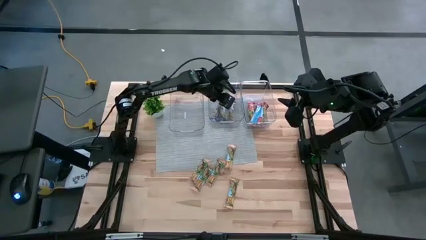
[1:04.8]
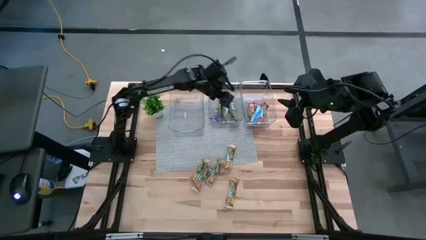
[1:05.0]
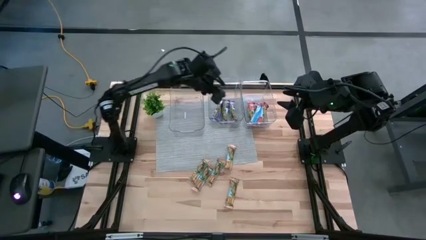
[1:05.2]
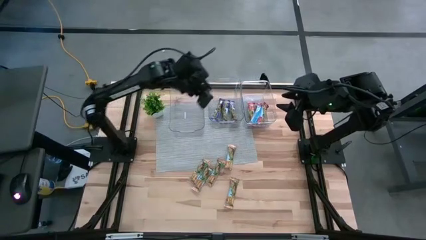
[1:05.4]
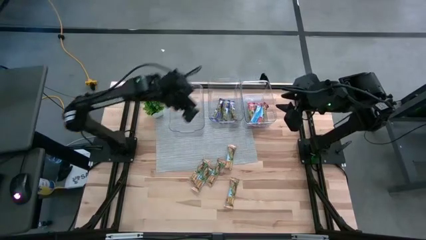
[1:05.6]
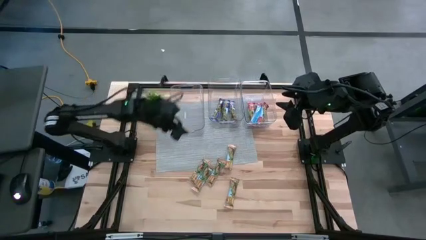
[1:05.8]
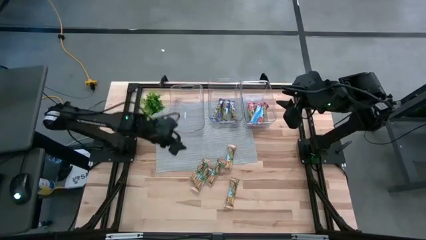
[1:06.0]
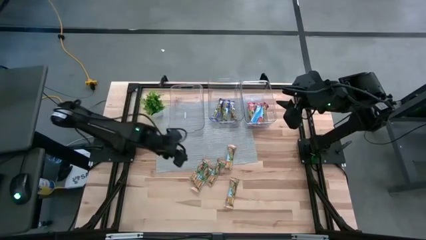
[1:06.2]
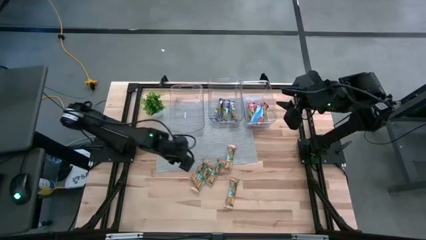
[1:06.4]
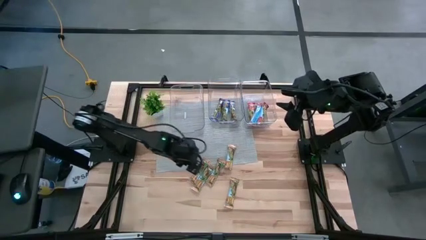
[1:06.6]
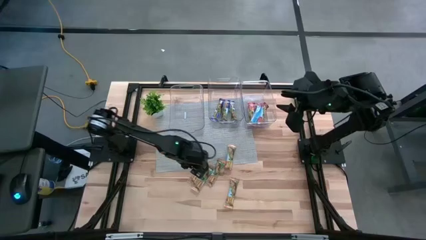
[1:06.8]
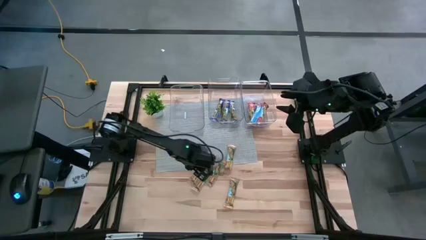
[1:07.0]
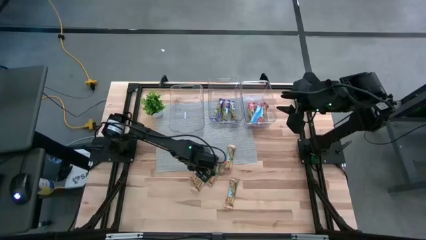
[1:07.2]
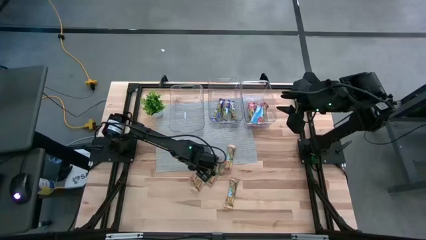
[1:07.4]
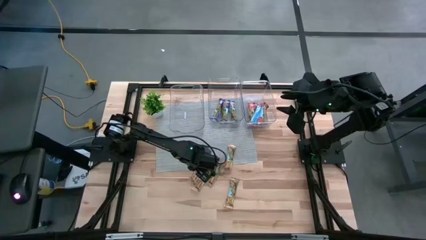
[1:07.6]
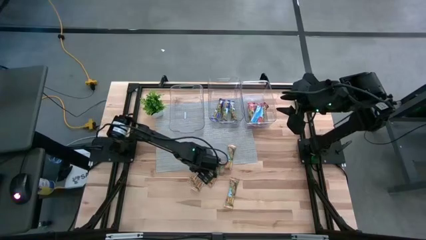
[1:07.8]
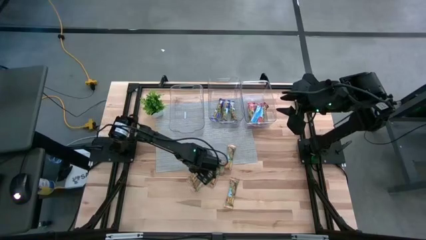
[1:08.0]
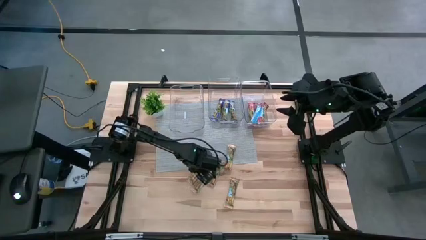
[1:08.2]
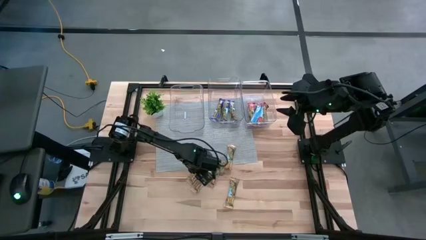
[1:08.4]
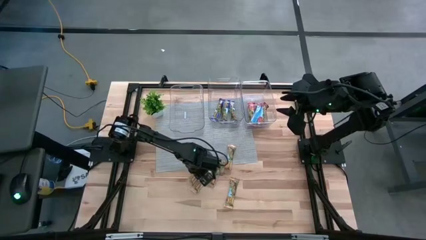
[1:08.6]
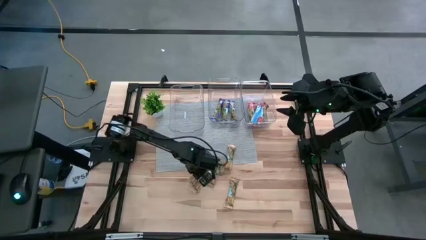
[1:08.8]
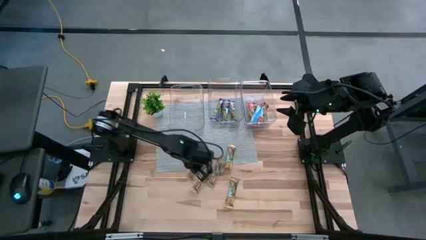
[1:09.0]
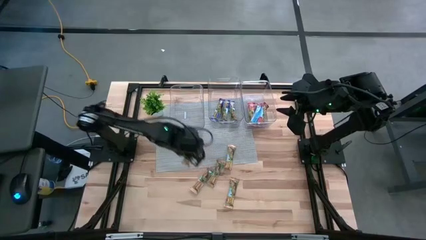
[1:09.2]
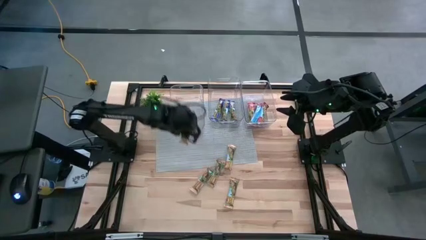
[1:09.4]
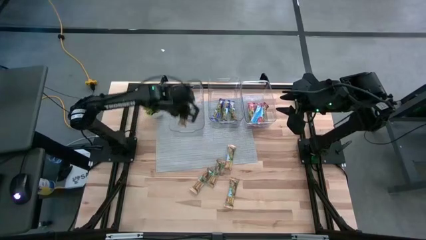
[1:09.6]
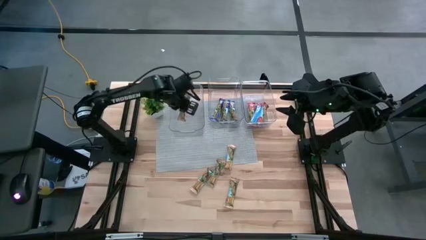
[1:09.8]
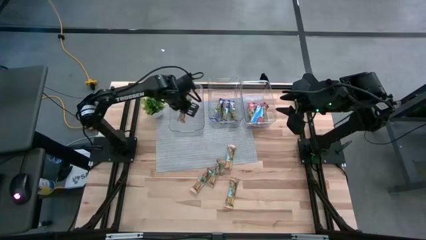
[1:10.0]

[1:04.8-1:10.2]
Task: Pick and place Granola Bars by type
Put the yellow granola bar into the left transparent bin

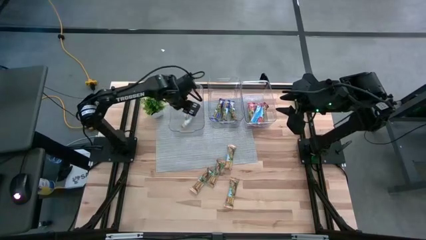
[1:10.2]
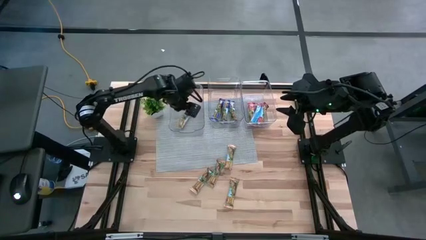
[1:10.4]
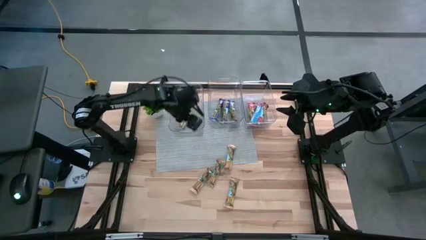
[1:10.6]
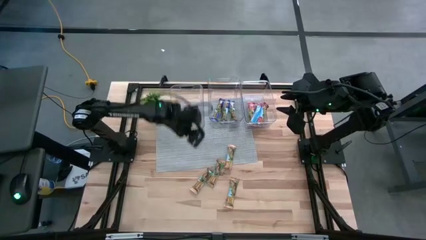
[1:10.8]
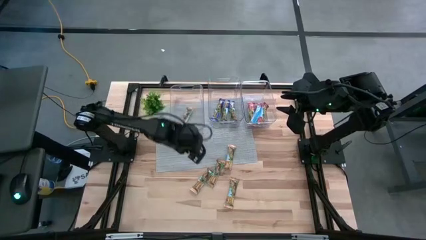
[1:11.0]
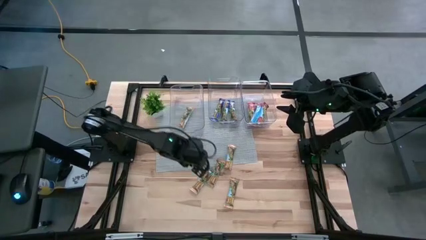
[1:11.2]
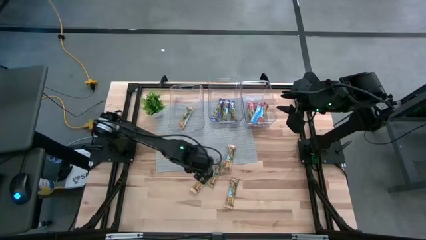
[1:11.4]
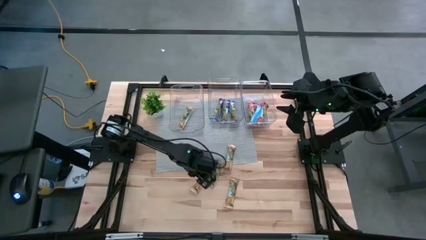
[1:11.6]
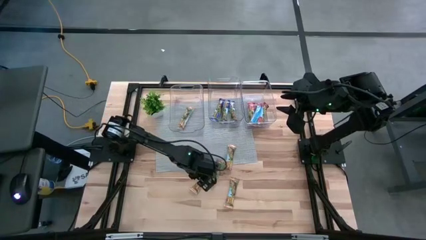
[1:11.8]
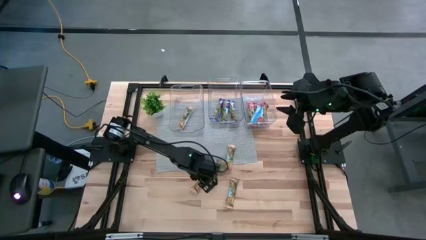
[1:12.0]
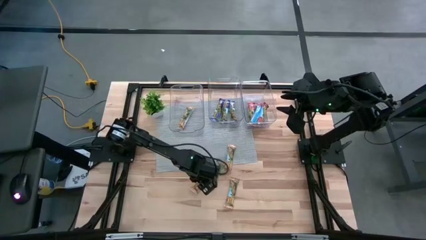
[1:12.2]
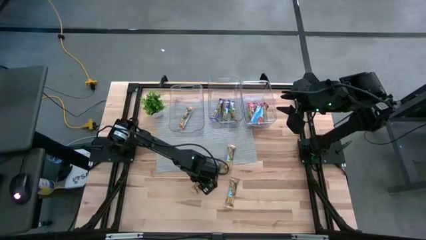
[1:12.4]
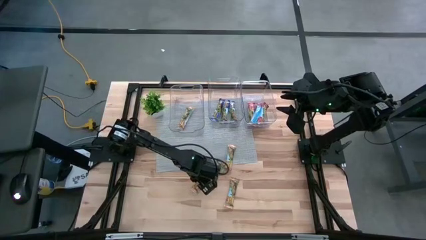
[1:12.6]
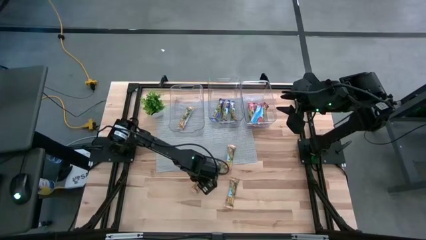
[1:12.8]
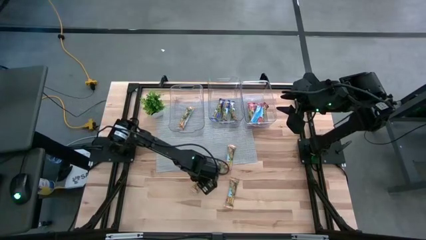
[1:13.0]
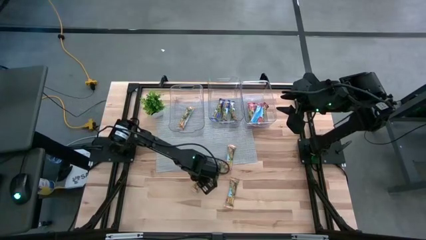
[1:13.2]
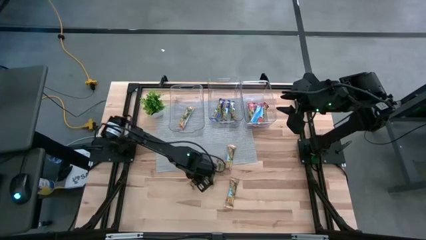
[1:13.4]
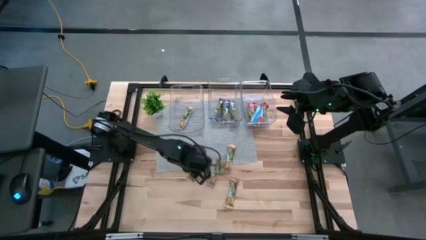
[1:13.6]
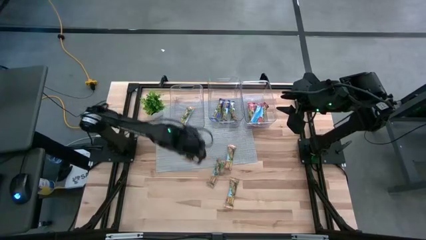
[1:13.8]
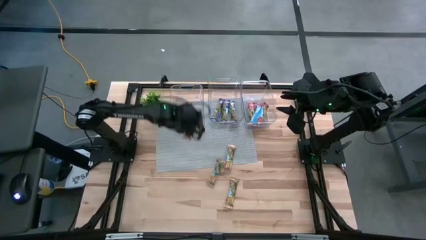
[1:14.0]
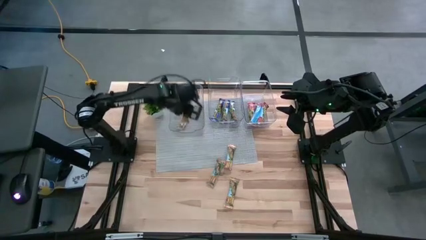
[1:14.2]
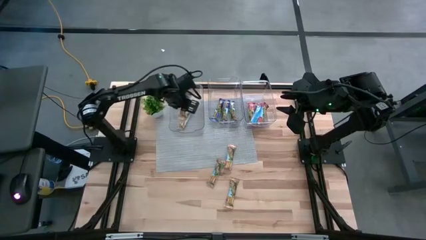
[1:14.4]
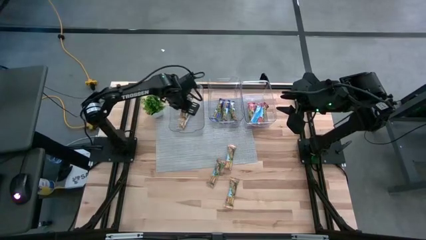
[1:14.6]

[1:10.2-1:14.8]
Put the yellow granola bar into the left transparent bin

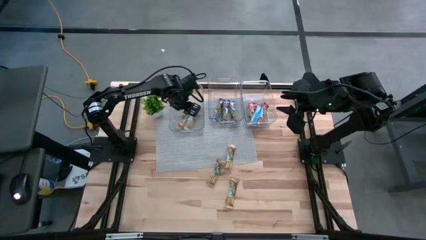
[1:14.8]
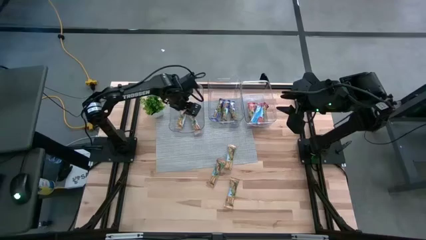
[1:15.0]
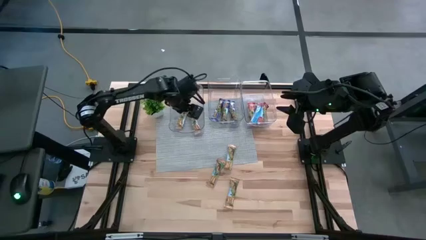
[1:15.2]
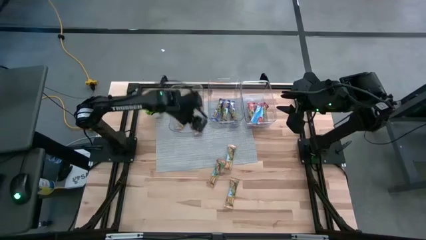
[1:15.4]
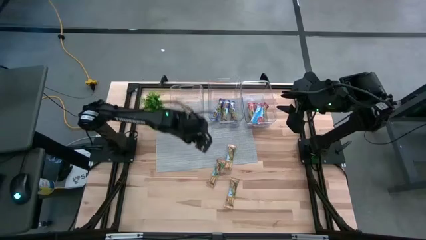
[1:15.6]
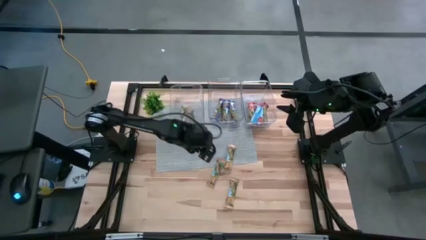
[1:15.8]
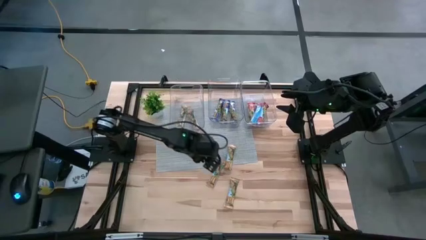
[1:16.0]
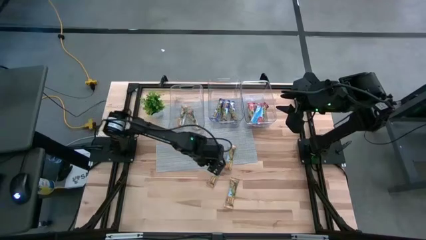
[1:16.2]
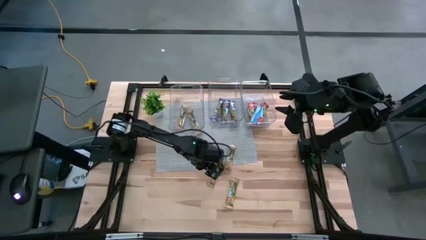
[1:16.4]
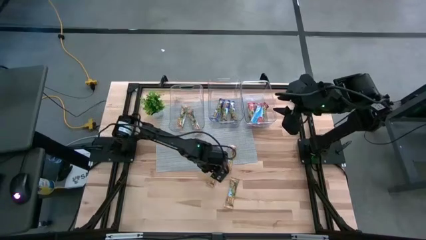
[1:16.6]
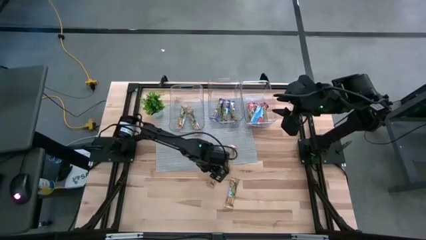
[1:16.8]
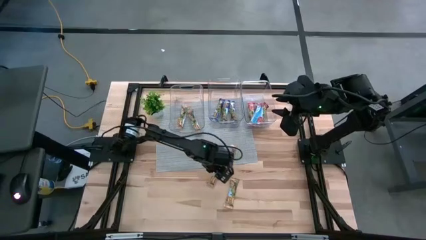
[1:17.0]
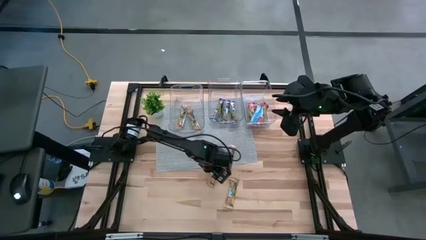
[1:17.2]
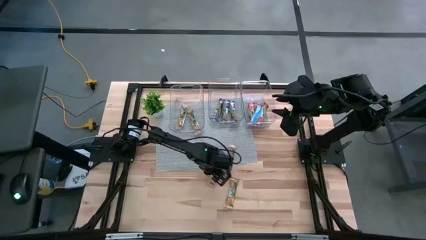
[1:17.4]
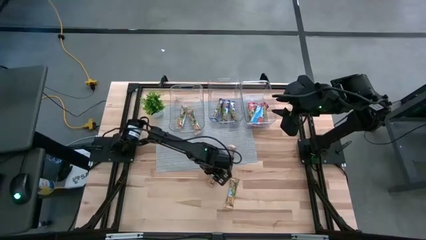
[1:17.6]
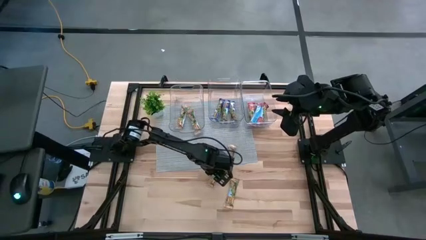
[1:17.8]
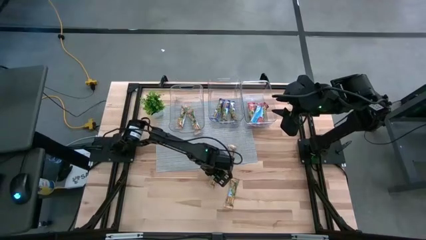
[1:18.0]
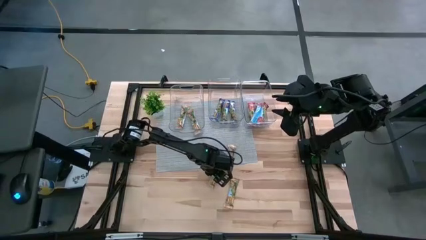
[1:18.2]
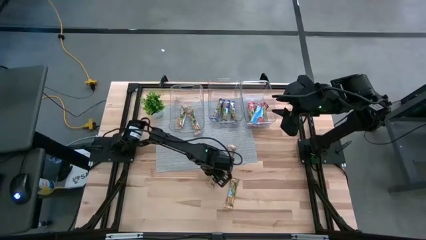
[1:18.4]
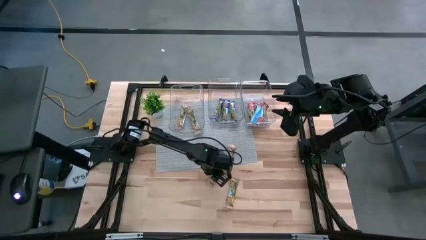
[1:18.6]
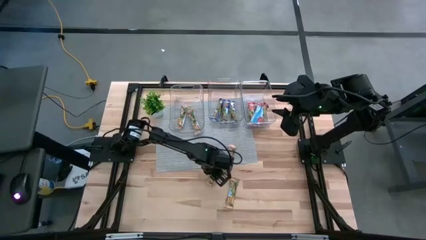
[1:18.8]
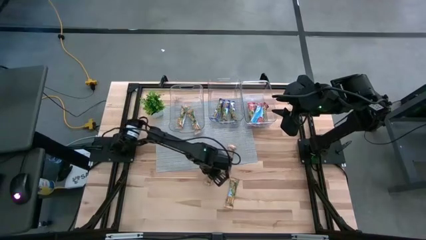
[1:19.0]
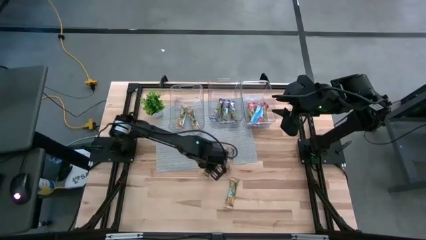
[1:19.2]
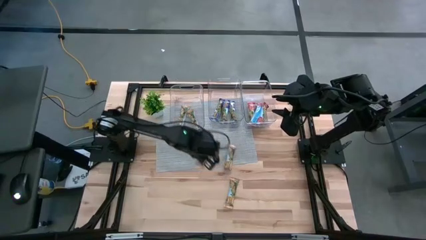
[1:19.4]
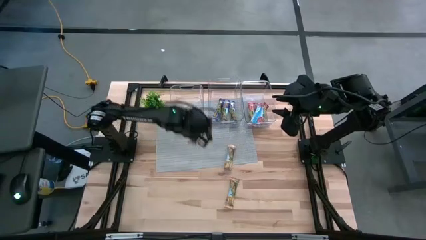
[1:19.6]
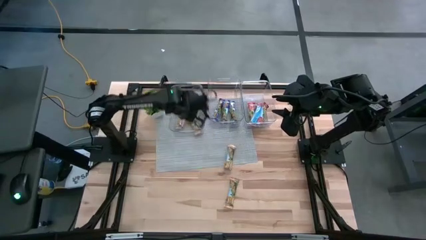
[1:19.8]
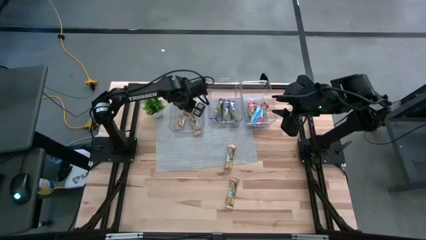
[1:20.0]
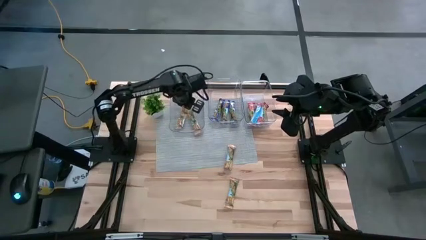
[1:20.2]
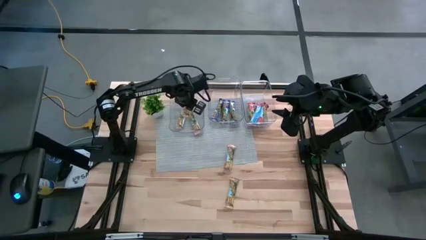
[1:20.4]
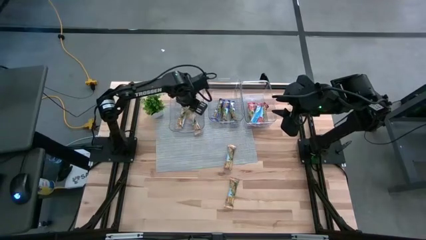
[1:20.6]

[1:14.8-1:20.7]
Put the yellow granola bar into the left transparent bin
